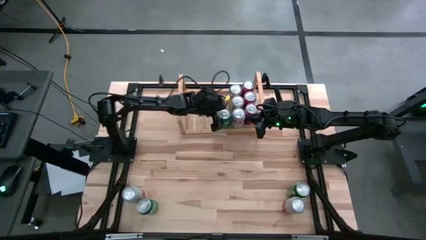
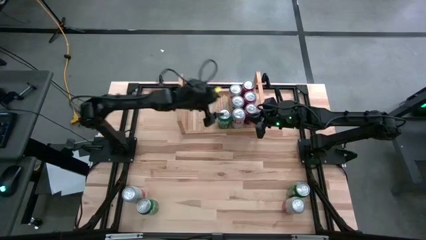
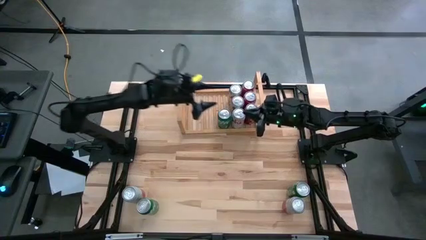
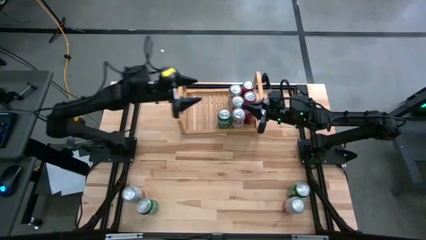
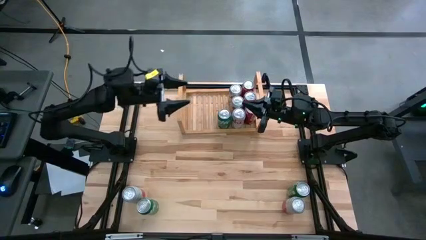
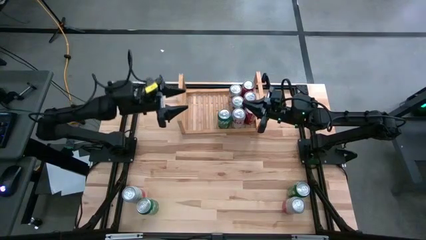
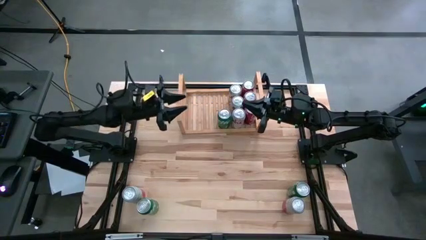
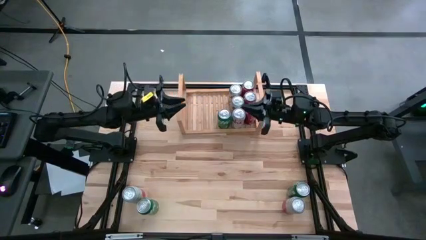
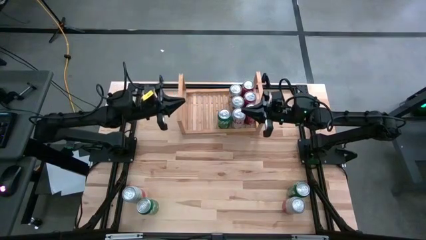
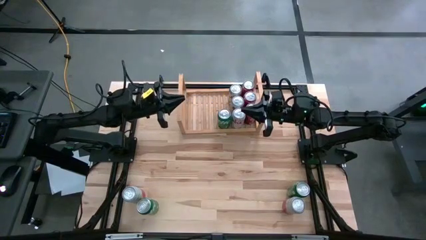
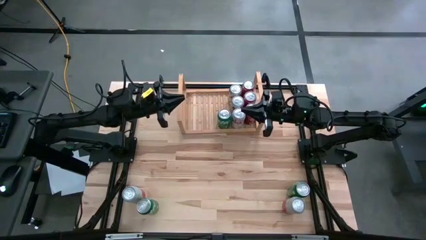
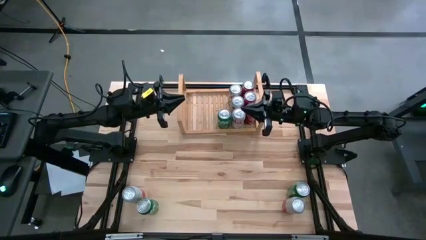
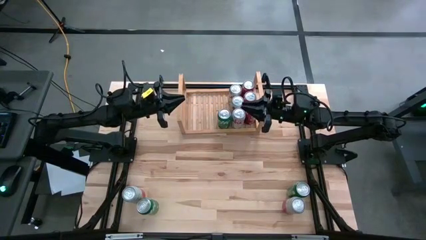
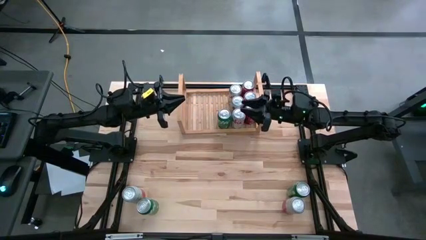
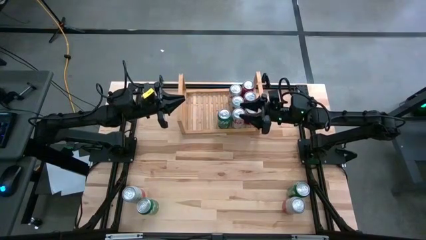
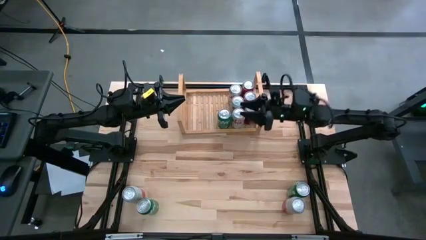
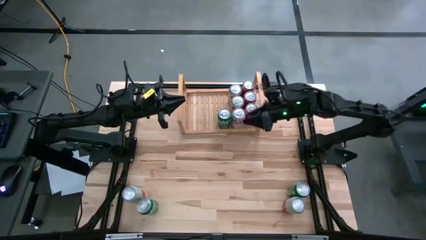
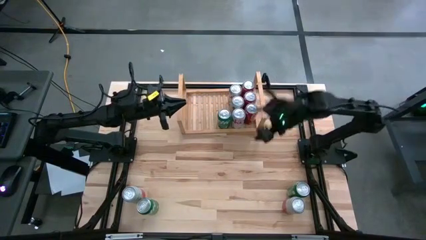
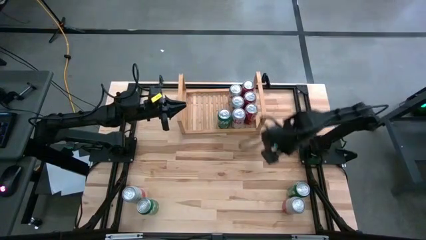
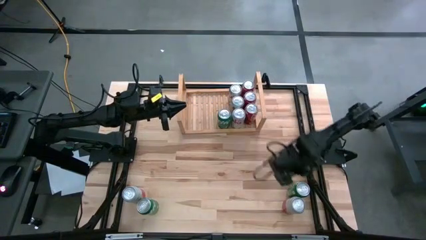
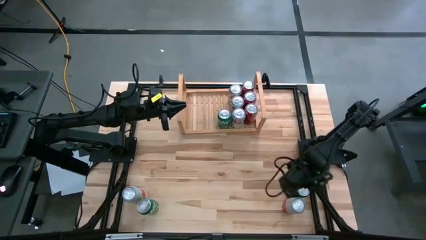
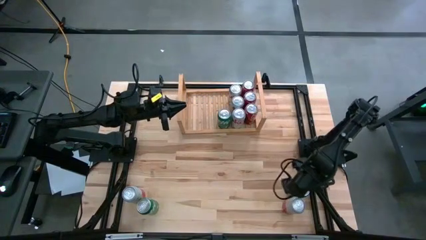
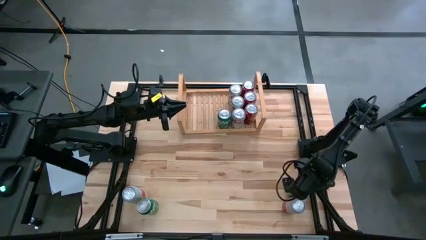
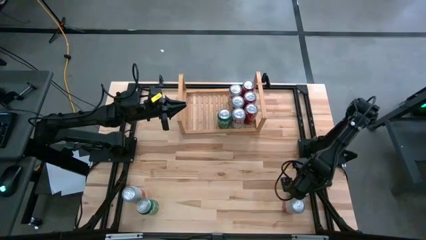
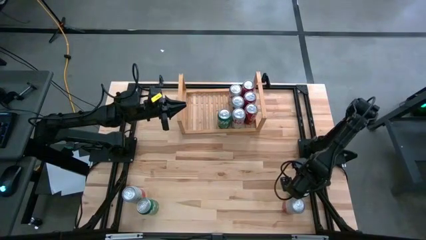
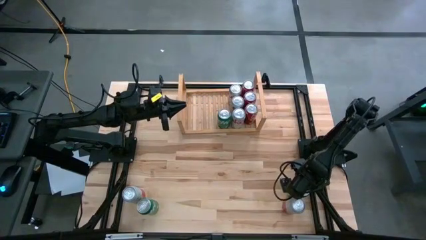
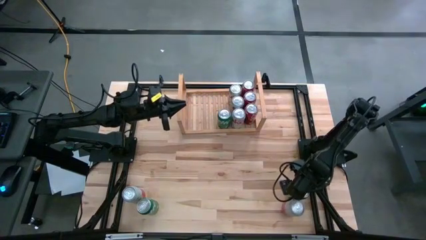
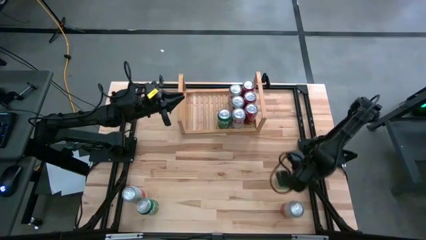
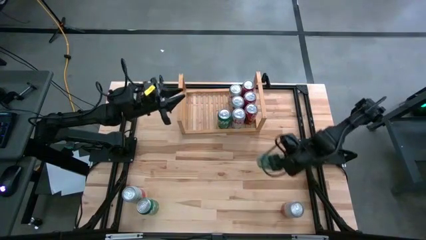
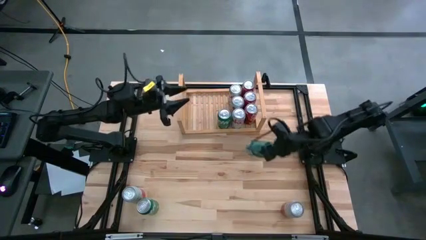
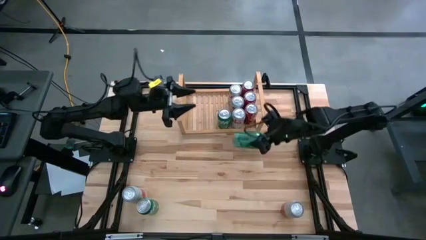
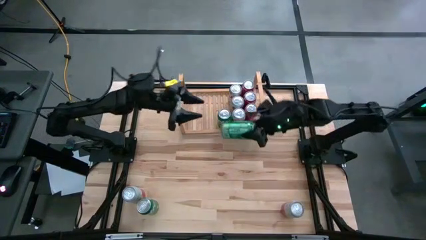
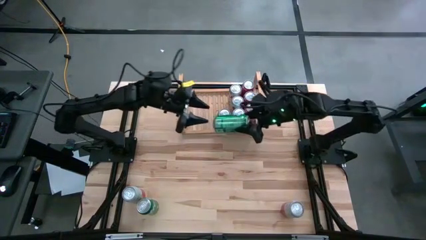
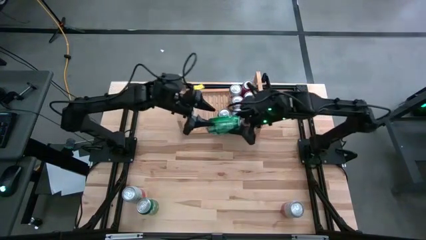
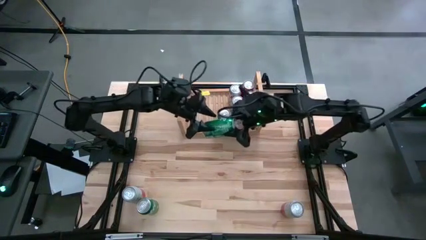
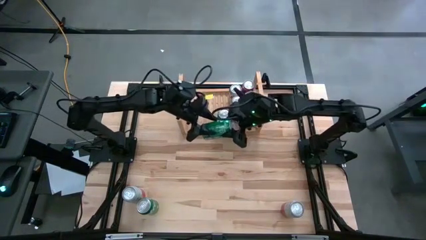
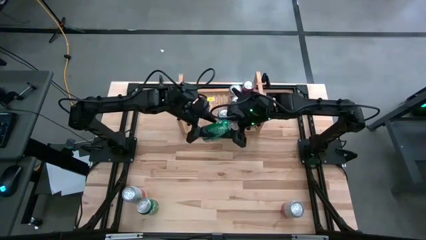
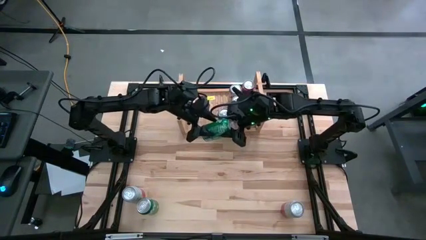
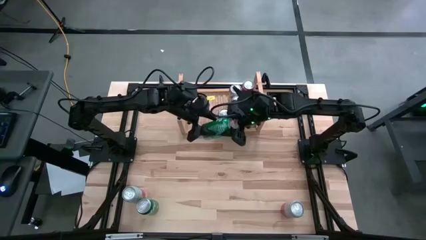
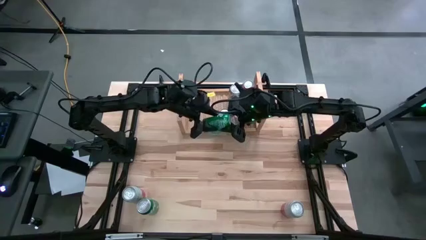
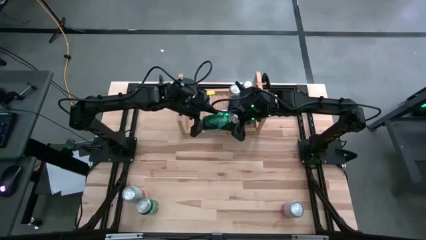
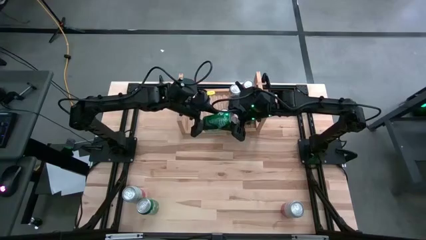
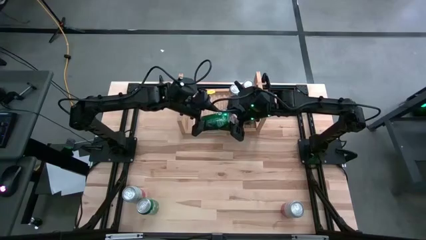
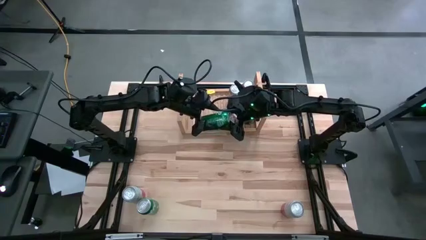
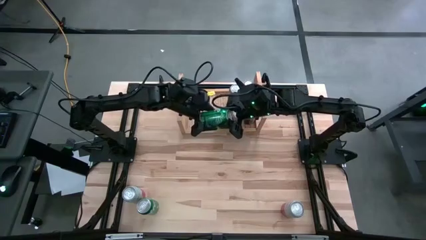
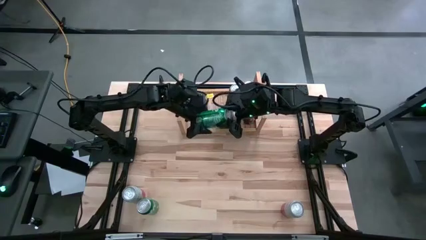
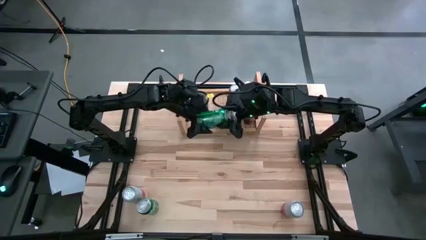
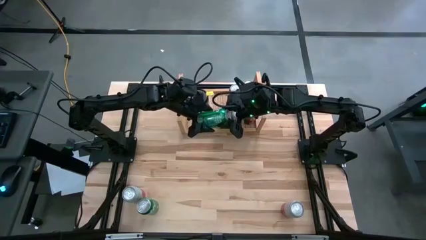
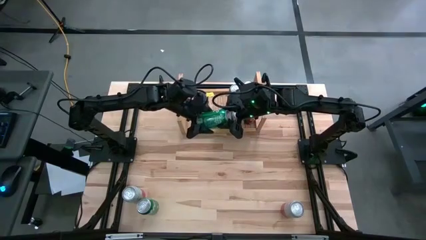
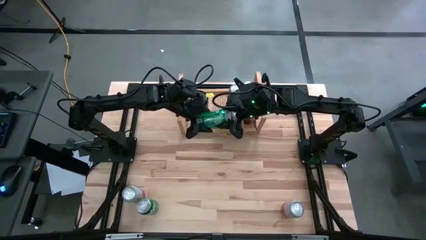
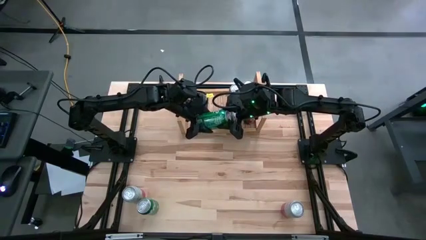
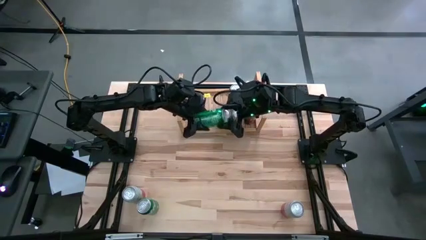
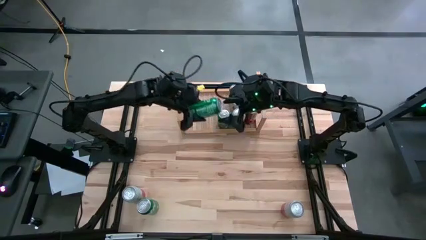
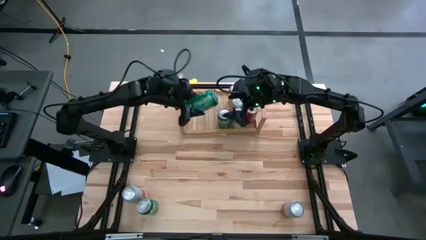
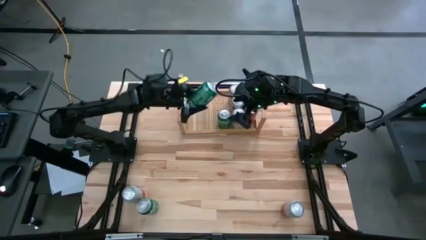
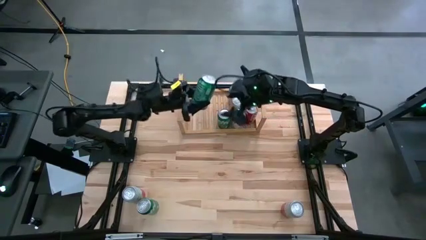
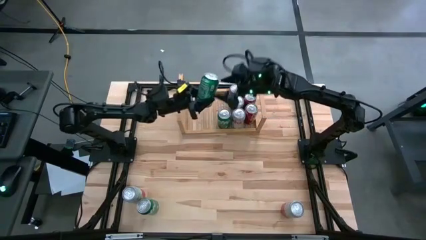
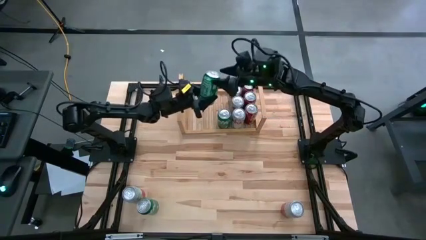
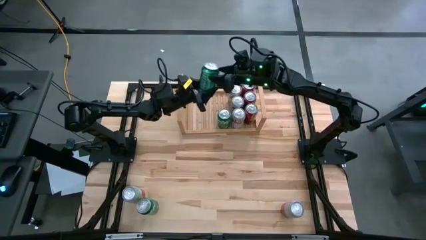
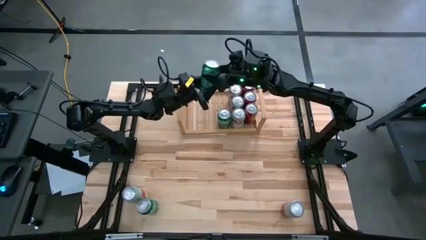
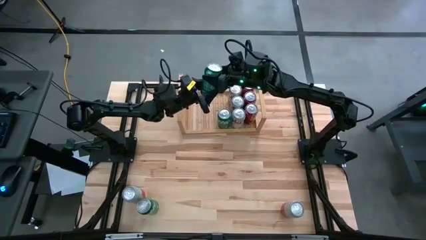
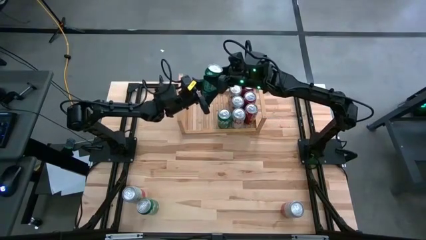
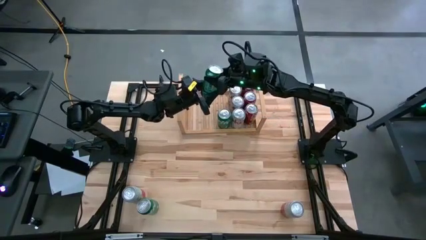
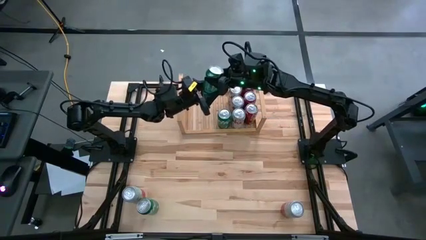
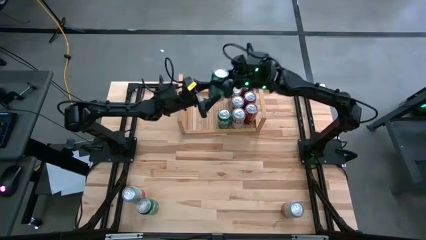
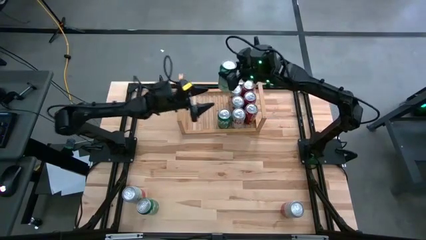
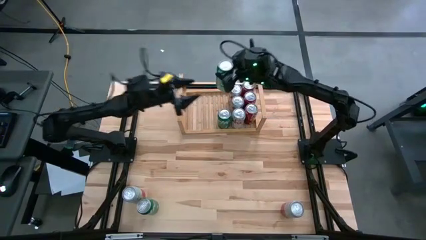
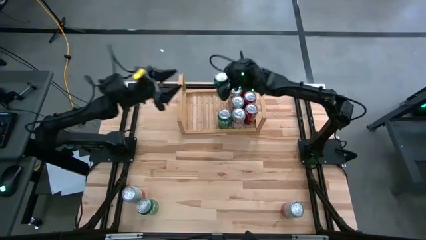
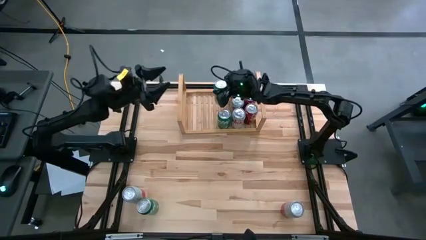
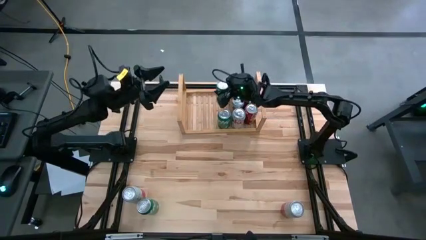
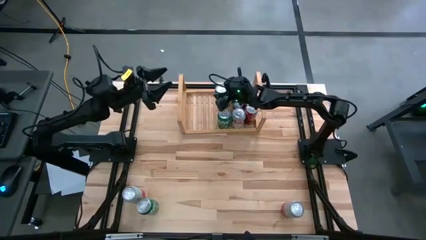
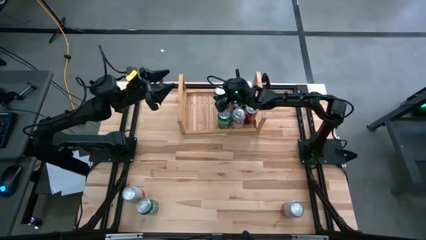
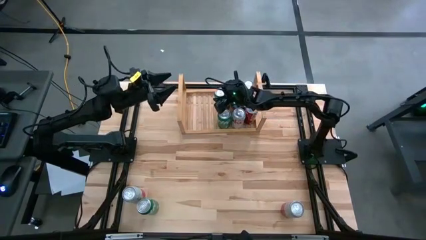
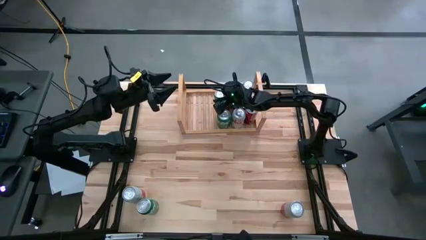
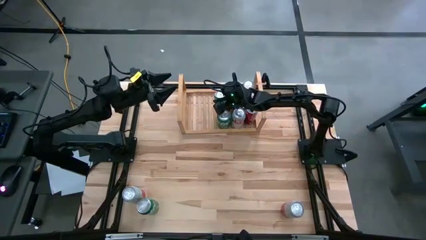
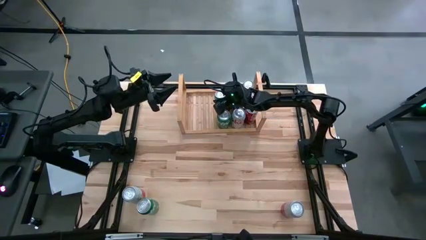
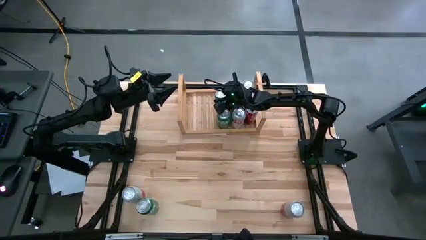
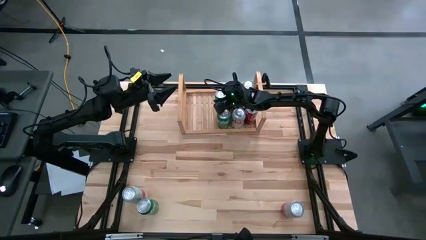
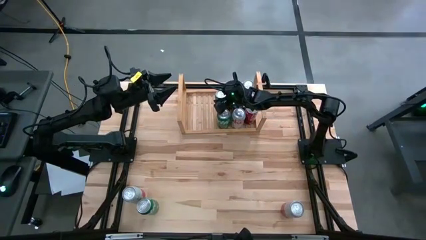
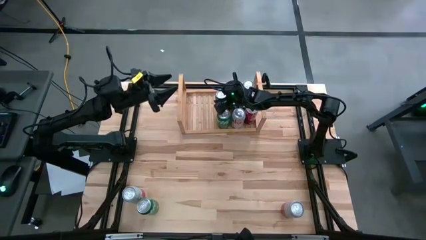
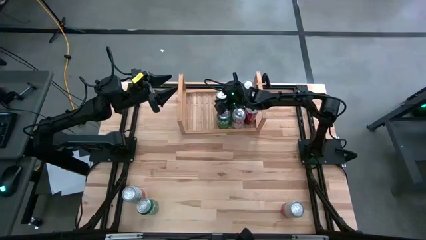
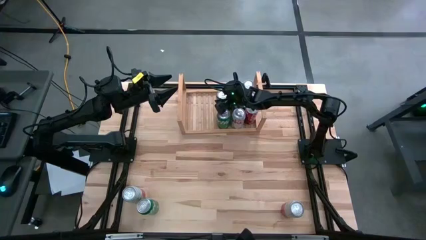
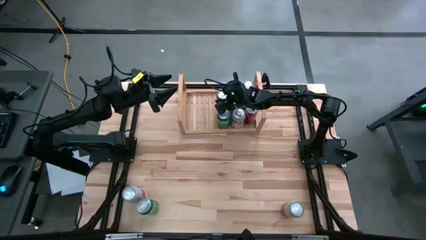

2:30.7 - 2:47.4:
Task: Place canned beverage on shelf
Put the right green soda can on the shelf aligned with the other green soda can on the shelf
